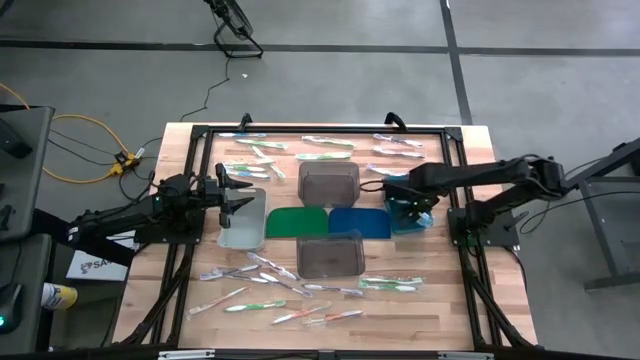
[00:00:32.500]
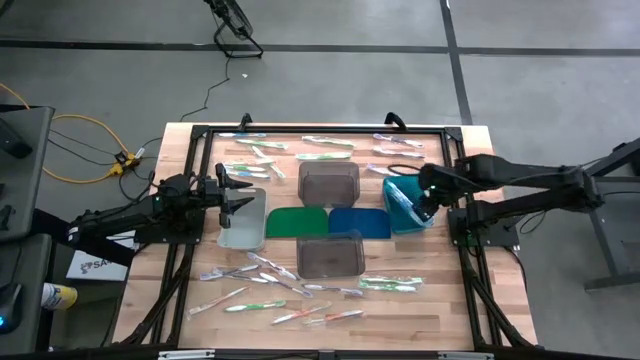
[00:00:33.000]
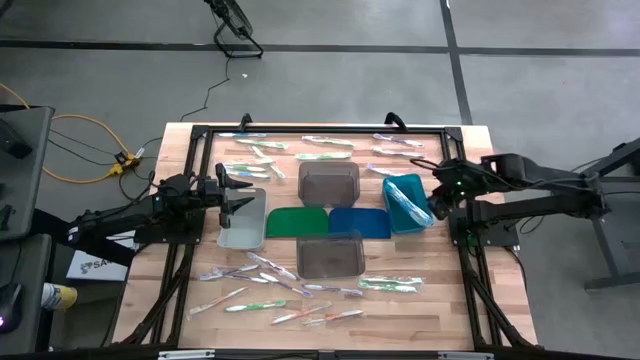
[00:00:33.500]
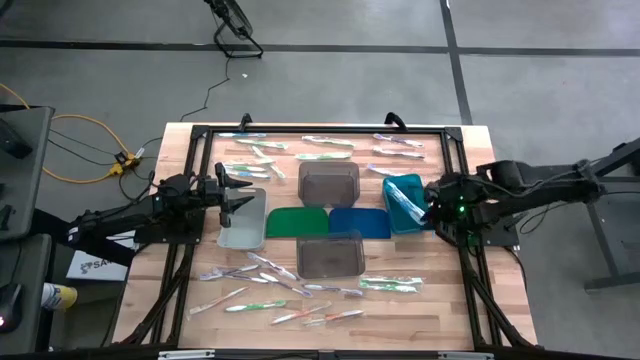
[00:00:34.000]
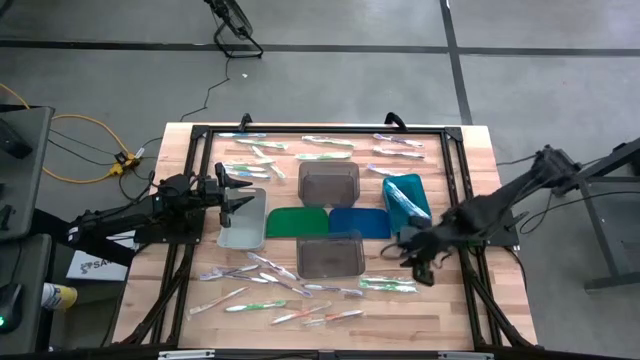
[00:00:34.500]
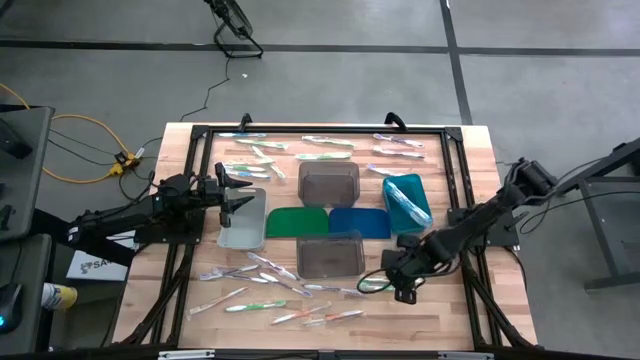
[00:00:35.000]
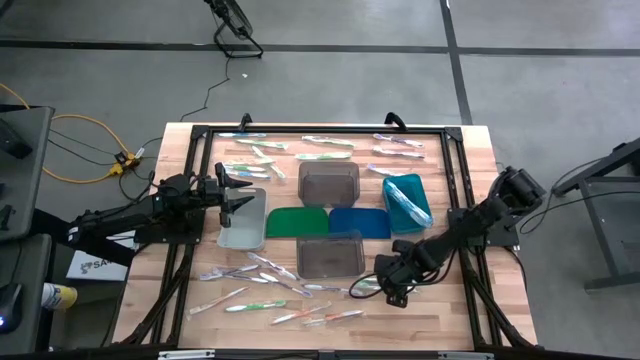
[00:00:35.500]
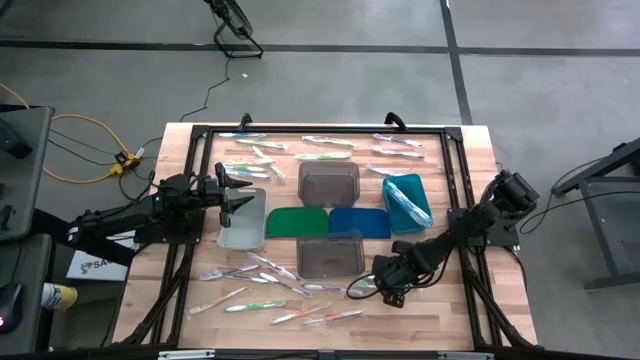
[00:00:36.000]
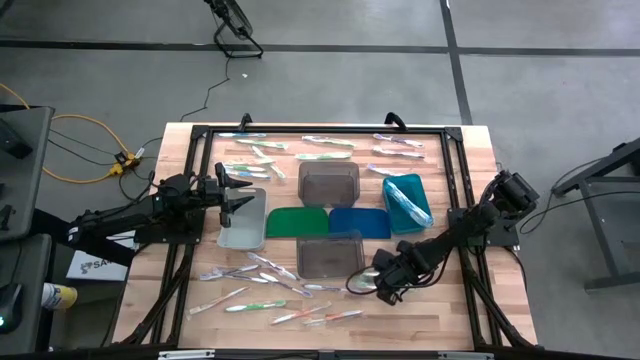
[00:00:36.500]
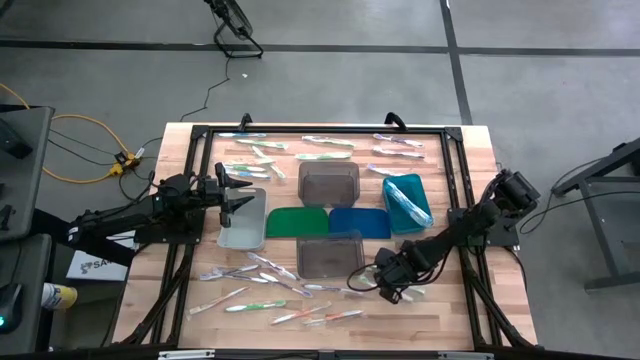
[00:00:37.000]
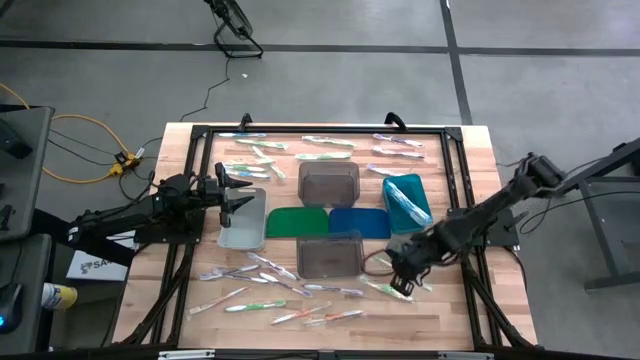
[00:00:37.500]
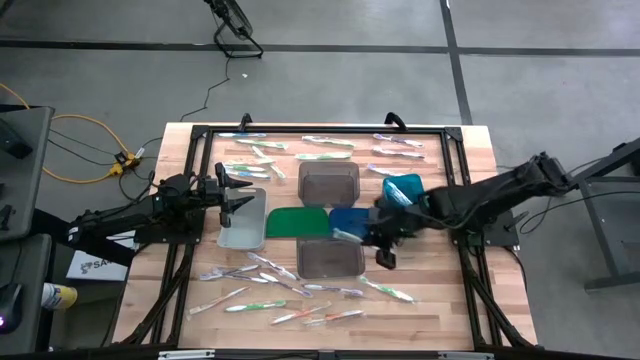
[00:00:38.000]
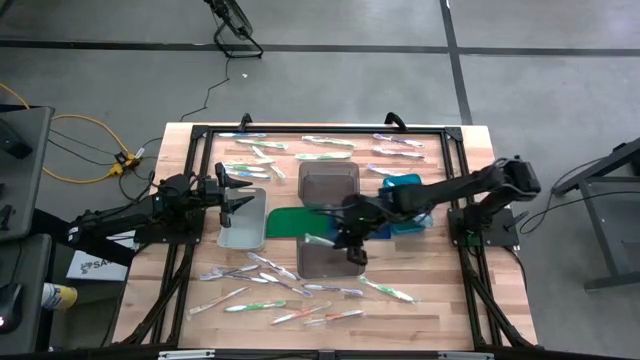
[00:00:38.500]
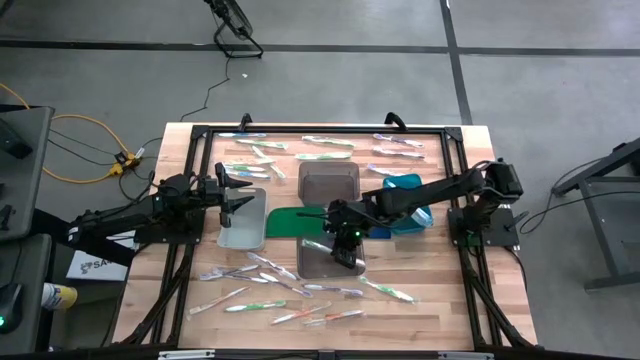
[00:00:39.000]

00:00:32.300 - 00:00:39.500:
Task: Pick & Place Toothbrushes
Put the green toothbrush into the bottom black bin

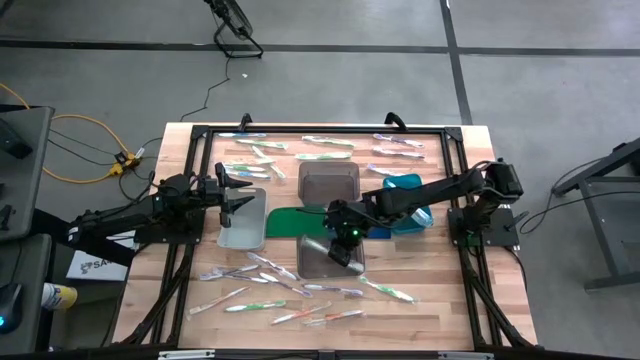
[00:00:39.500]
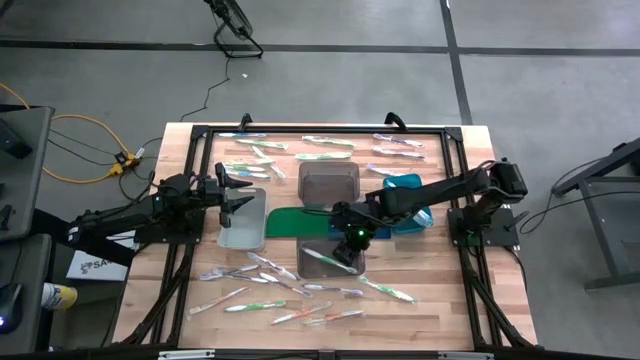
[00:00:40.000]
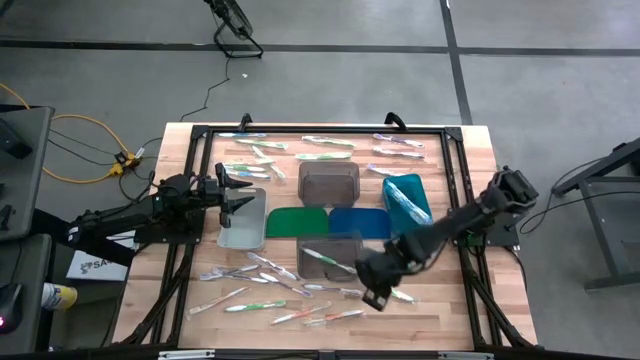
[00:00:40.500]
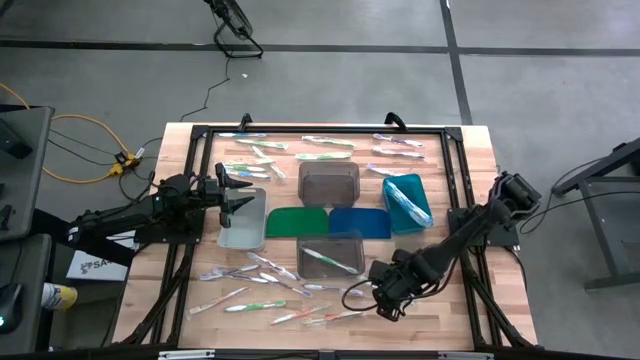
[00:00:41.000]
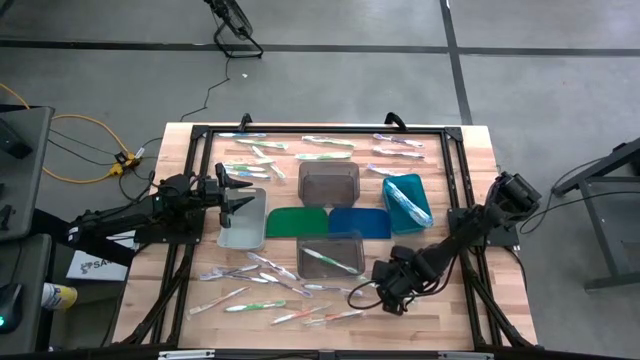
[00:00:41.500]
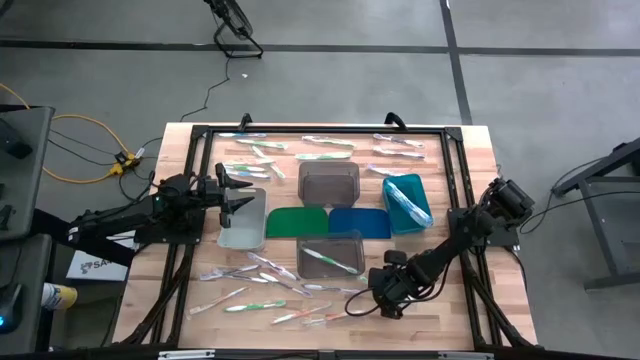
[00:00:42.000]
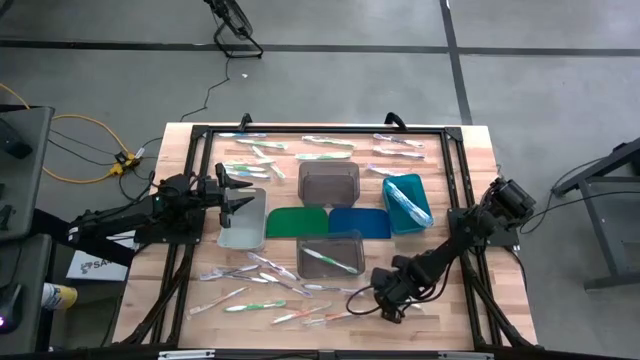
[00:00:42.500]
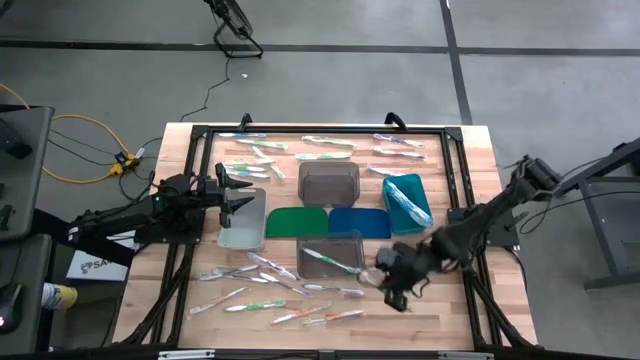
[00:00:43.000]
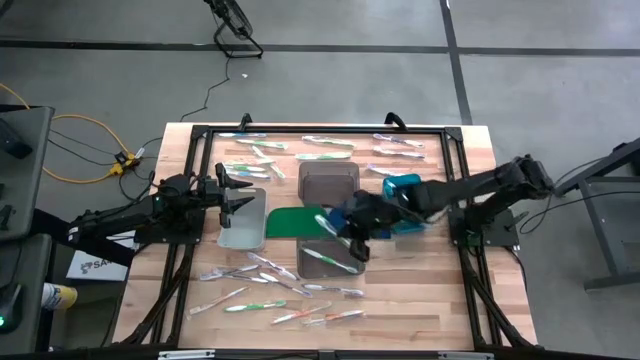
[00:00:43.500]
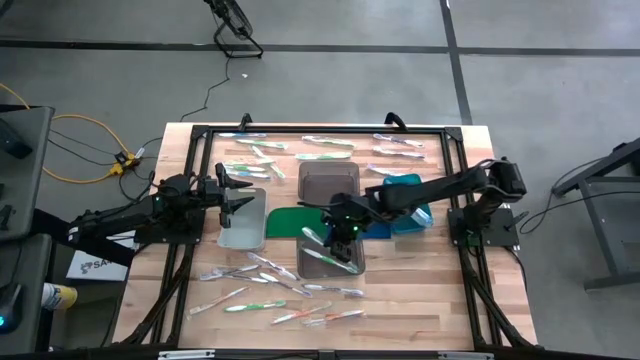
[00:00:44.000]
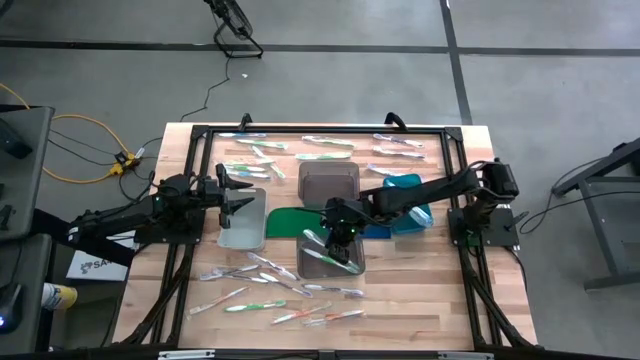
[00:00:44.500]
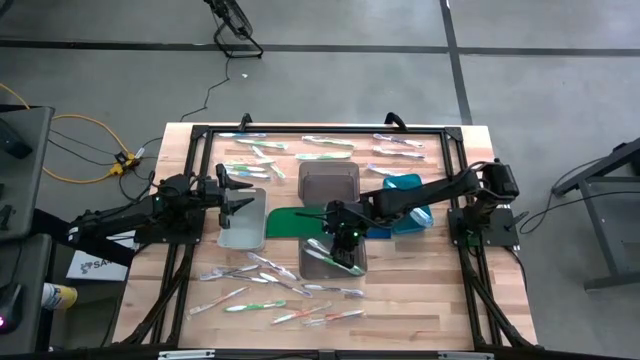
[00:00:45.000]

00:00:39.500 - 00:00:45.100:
Put the green toothbrush into the bottom black bin

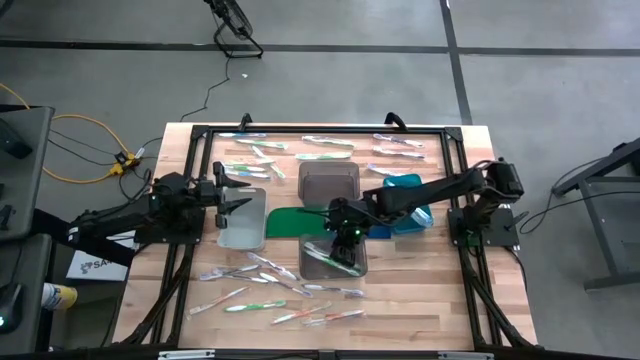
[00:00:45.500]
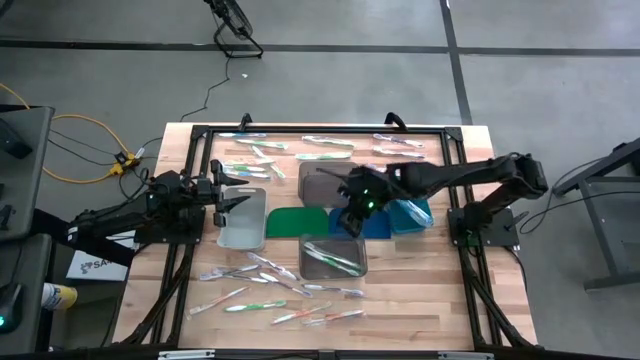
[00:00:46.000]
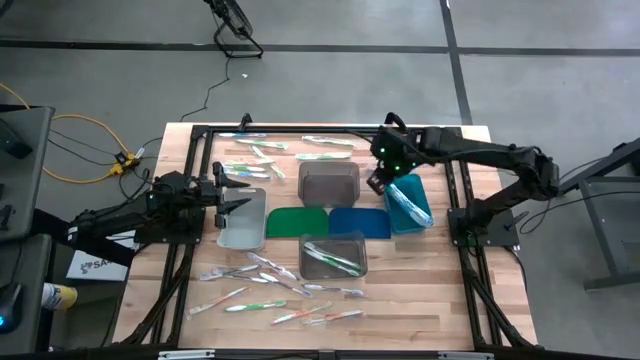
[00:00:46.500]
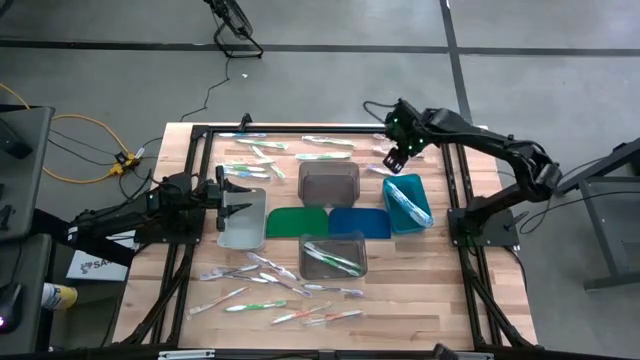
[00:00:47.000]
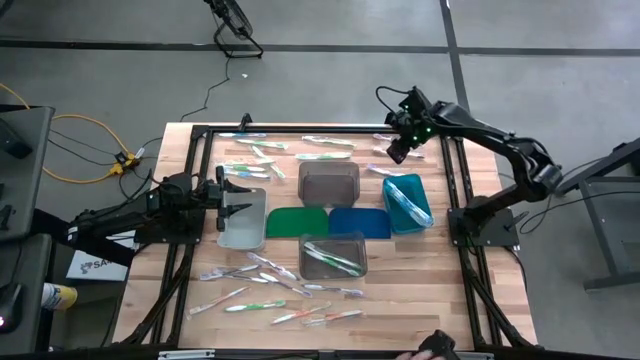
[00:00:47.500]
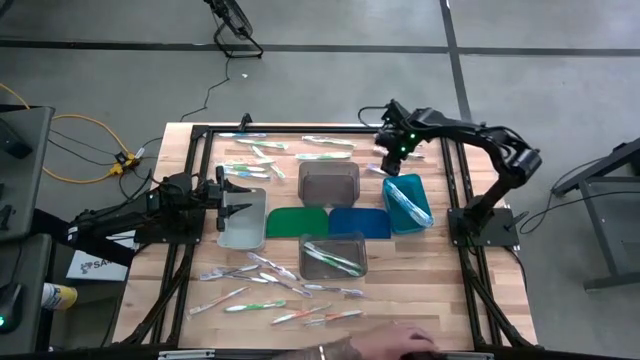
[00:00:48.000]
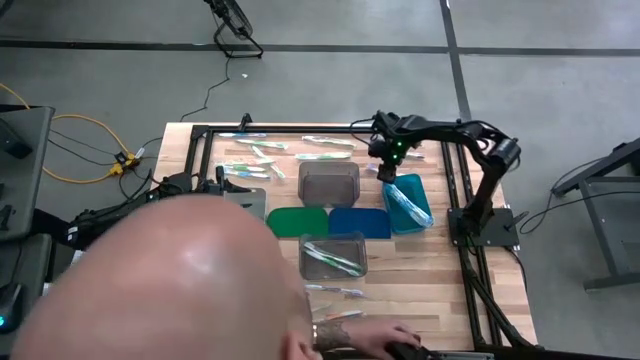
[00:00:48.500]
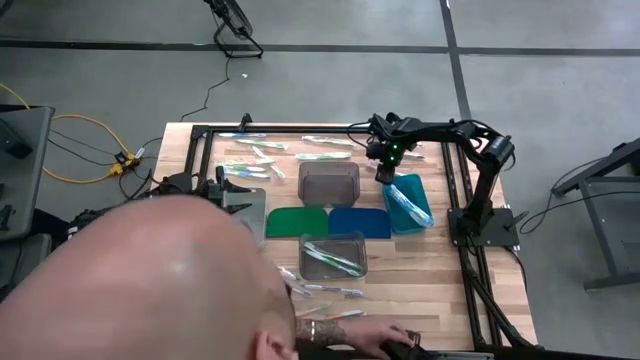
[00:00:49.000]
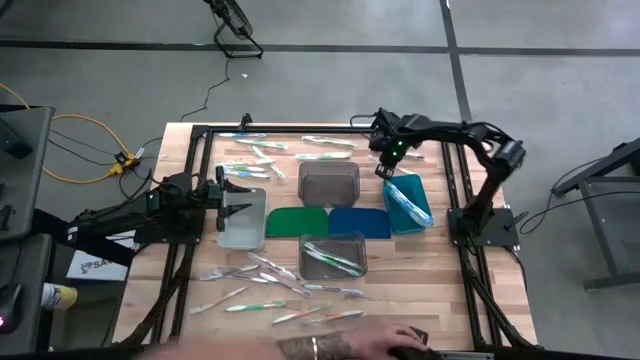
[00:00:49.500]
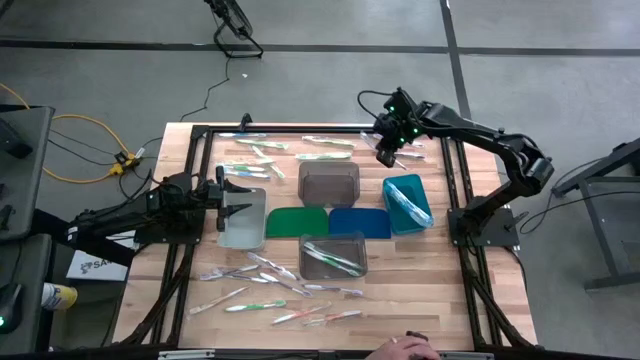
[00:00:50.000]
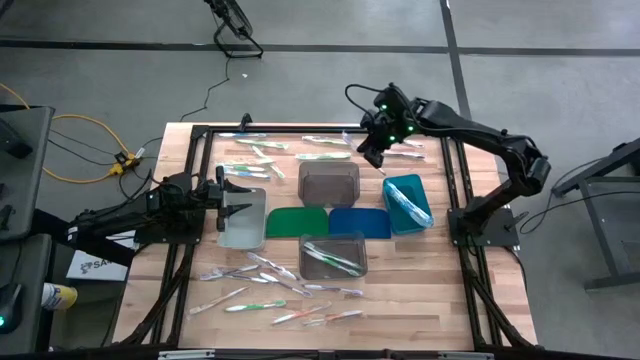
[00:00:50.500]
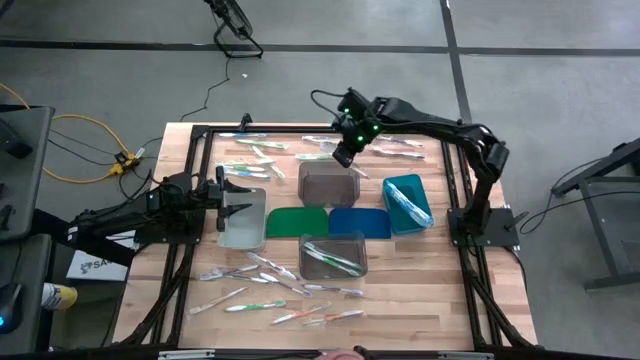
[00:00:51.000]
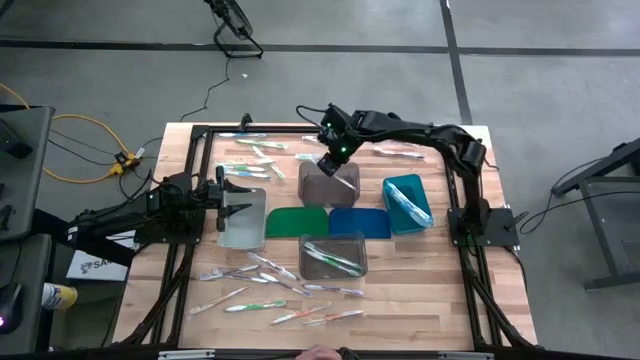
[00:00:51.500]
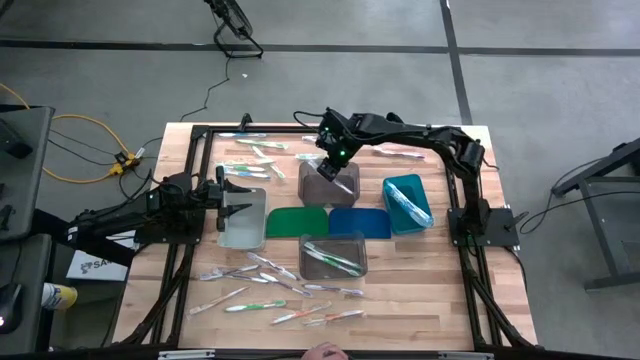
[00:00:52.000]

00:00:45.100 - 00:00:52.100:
Put the purple toothbrush into the top black bin

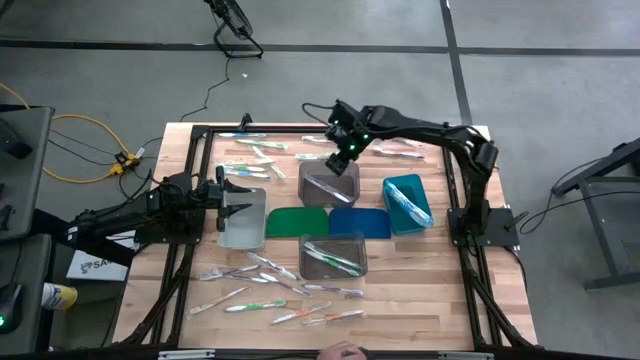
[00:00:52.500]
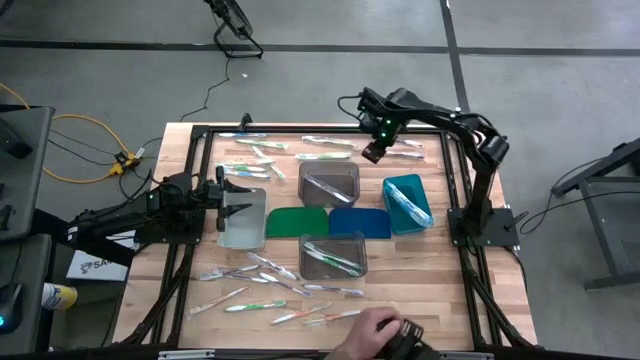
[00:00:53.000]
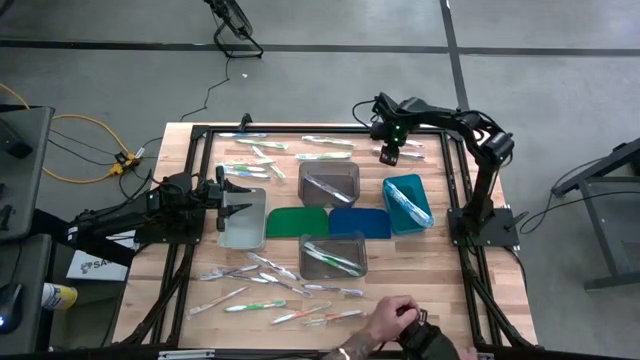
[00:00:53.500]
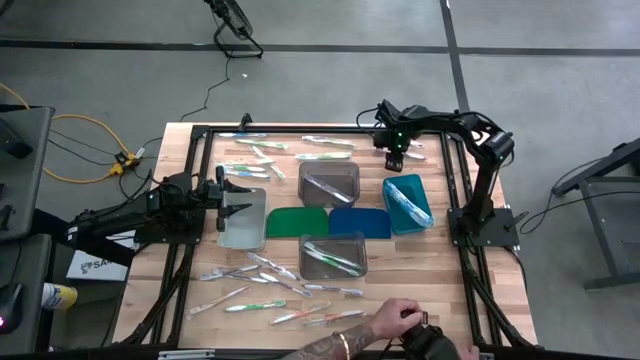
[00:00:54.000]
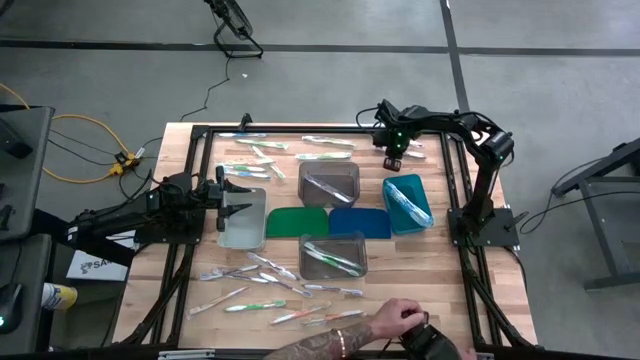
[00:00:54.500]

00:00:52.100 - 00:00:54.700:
Put the purple toothbrush into the top black bin
